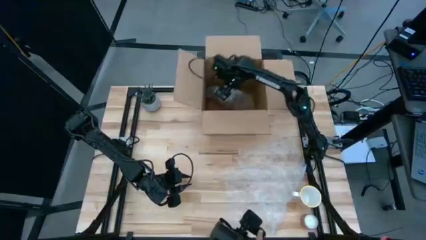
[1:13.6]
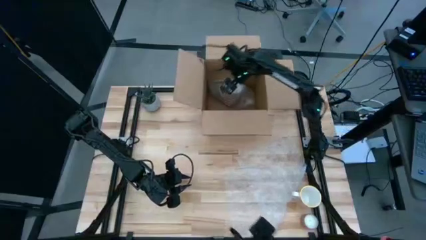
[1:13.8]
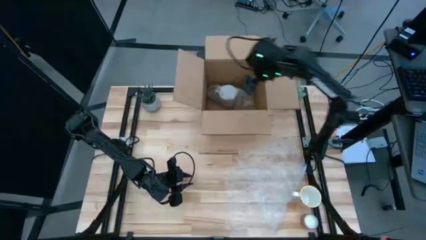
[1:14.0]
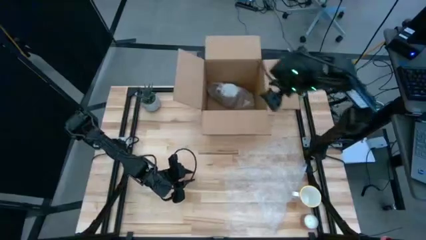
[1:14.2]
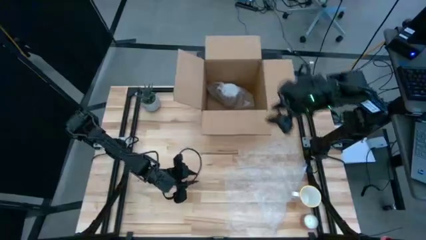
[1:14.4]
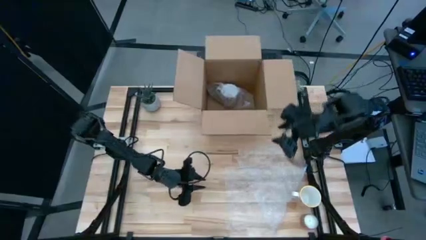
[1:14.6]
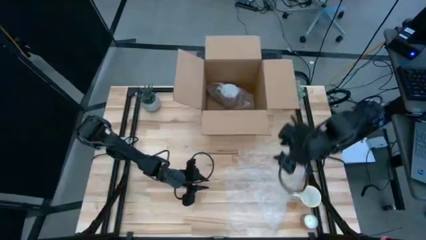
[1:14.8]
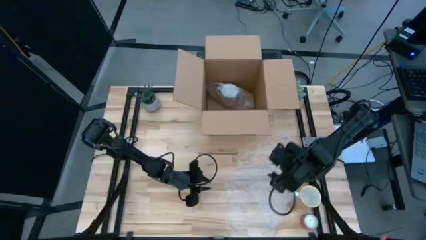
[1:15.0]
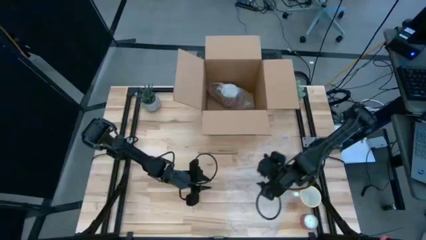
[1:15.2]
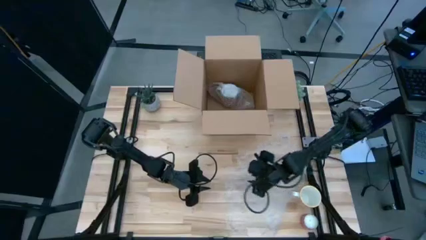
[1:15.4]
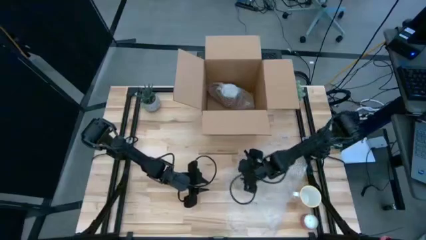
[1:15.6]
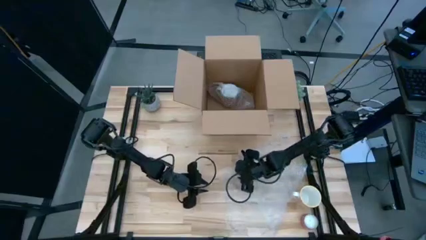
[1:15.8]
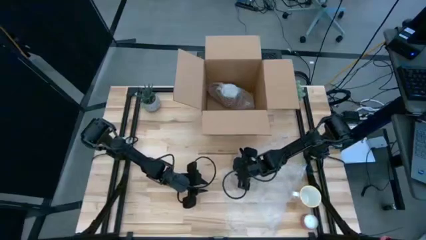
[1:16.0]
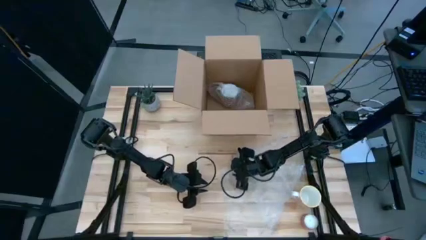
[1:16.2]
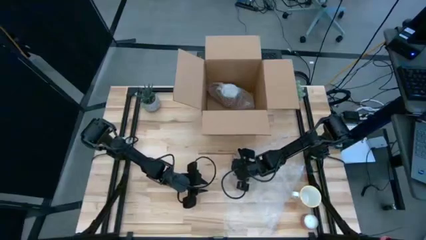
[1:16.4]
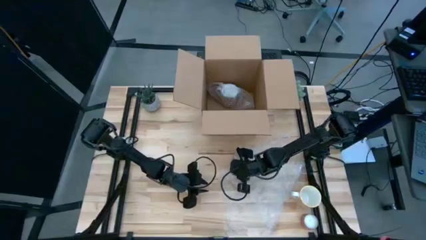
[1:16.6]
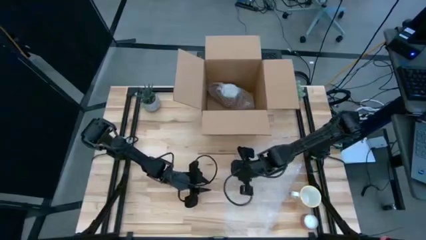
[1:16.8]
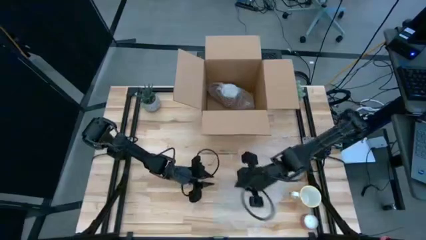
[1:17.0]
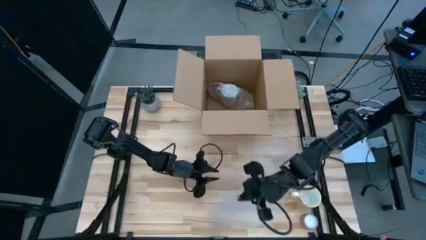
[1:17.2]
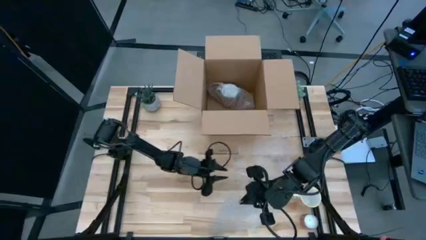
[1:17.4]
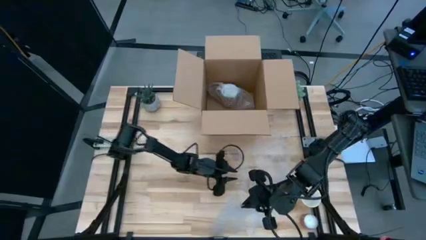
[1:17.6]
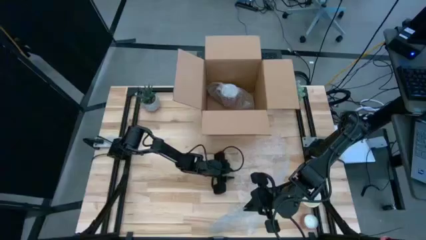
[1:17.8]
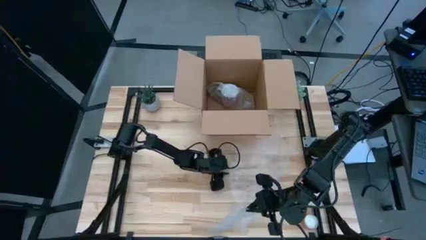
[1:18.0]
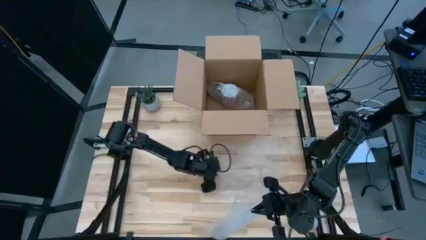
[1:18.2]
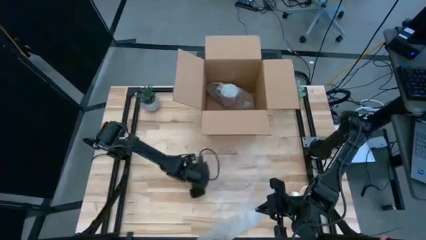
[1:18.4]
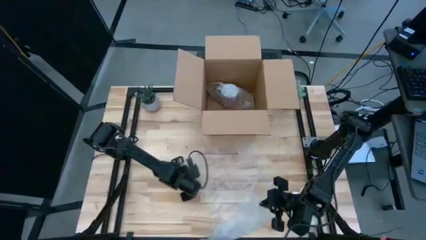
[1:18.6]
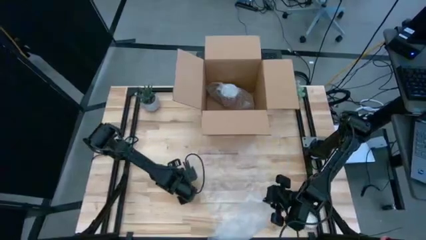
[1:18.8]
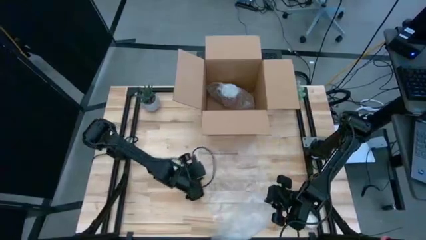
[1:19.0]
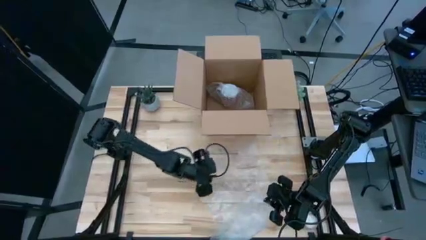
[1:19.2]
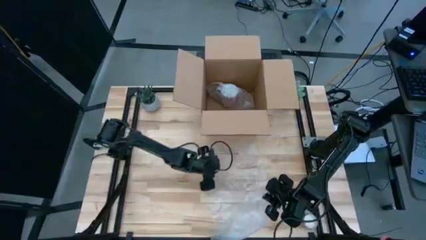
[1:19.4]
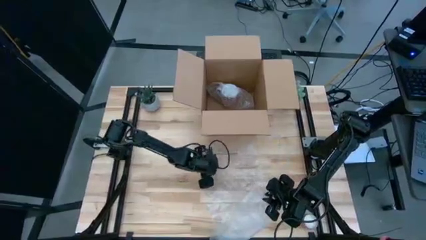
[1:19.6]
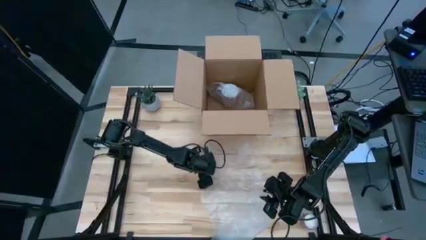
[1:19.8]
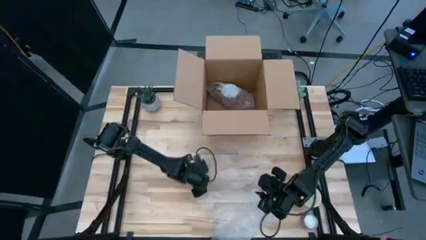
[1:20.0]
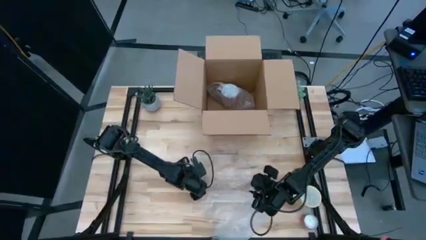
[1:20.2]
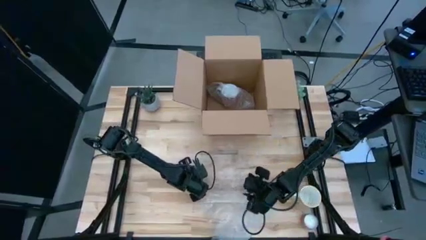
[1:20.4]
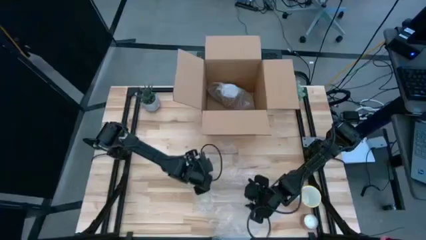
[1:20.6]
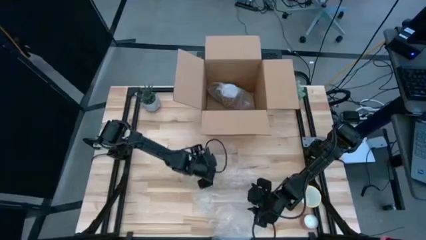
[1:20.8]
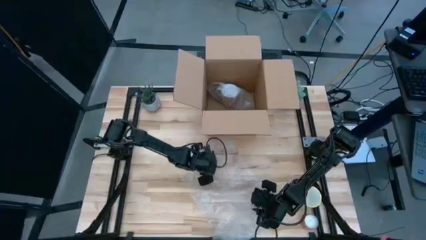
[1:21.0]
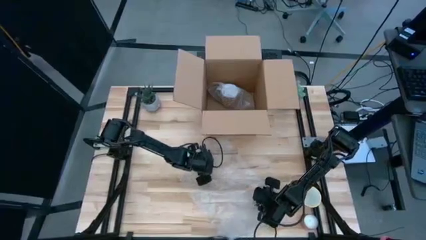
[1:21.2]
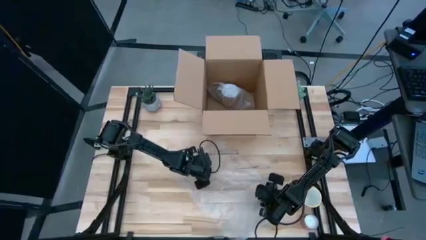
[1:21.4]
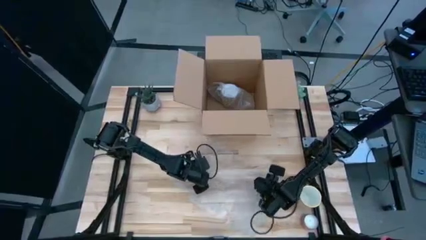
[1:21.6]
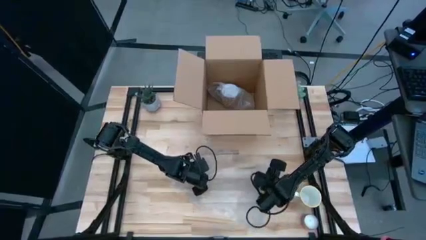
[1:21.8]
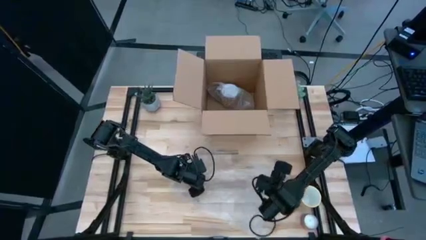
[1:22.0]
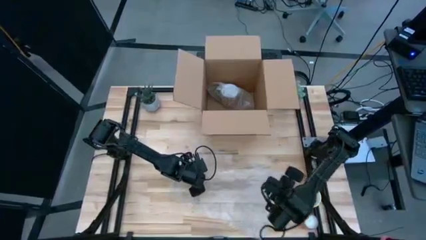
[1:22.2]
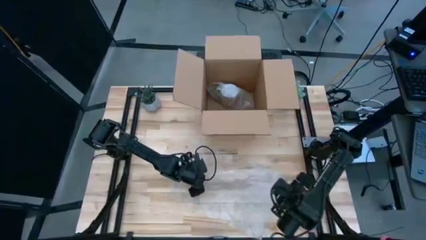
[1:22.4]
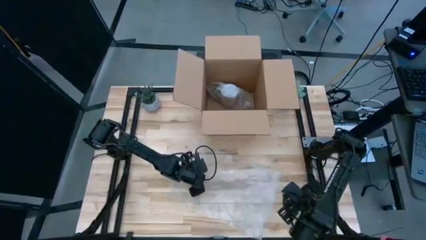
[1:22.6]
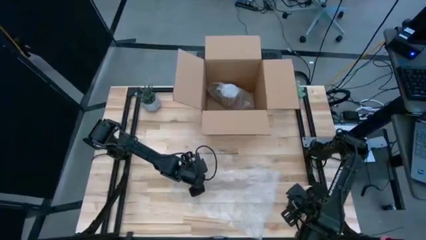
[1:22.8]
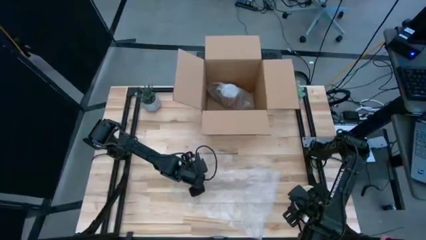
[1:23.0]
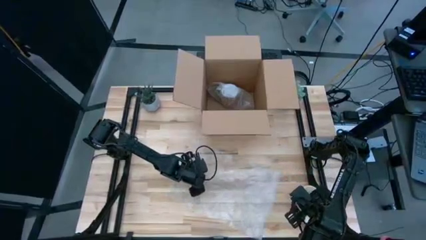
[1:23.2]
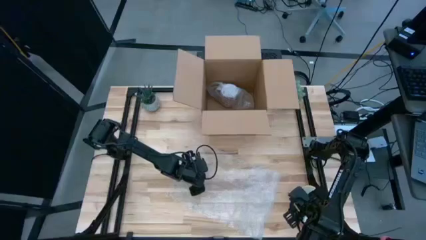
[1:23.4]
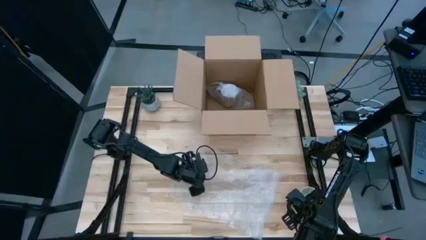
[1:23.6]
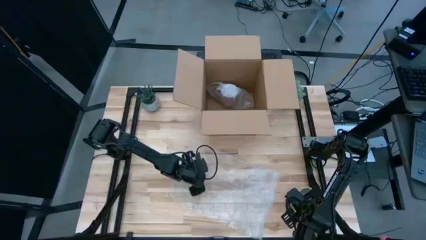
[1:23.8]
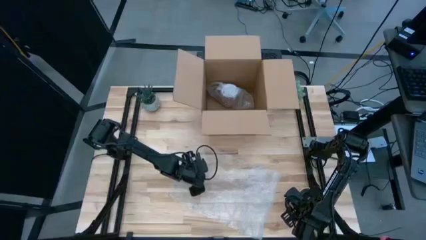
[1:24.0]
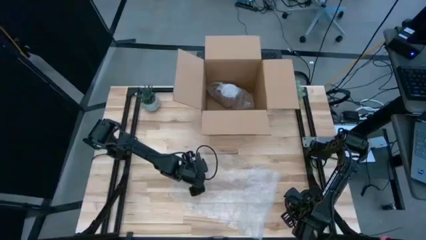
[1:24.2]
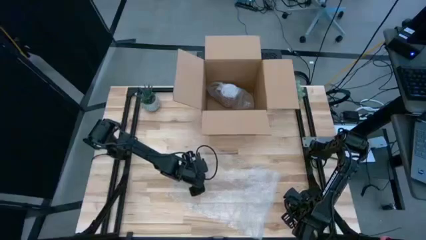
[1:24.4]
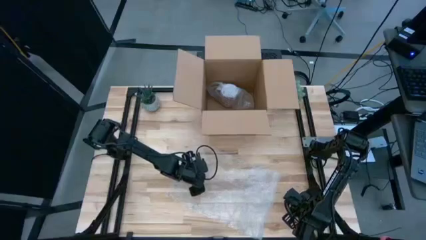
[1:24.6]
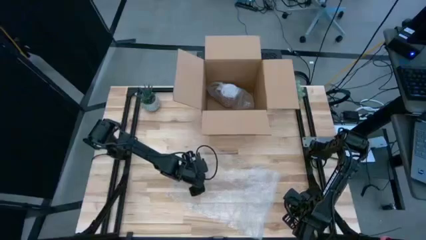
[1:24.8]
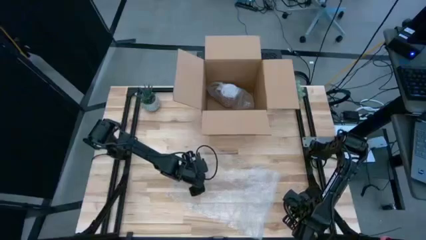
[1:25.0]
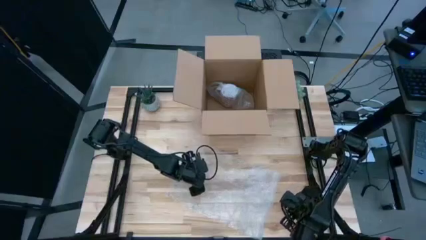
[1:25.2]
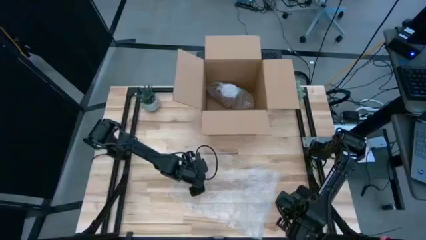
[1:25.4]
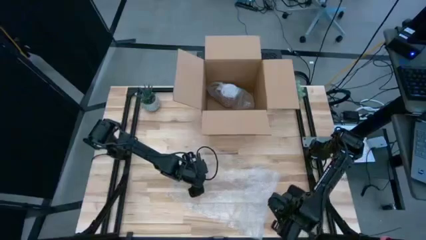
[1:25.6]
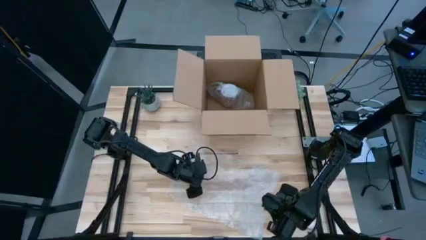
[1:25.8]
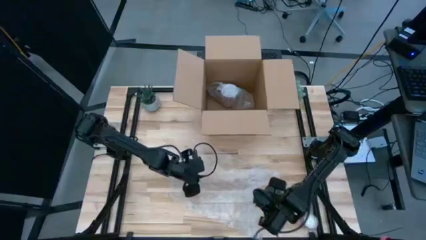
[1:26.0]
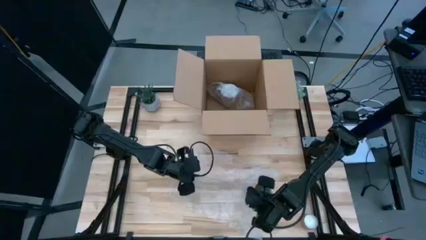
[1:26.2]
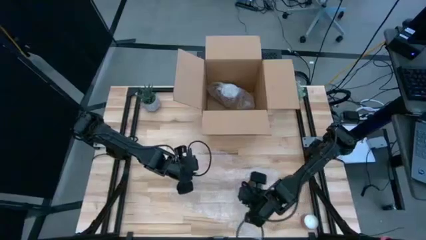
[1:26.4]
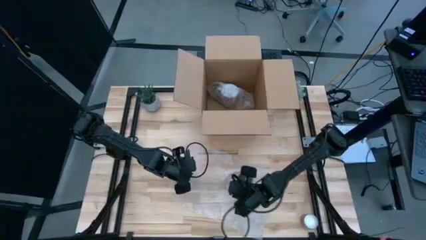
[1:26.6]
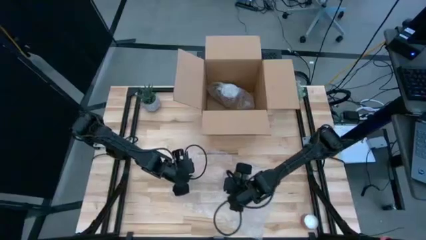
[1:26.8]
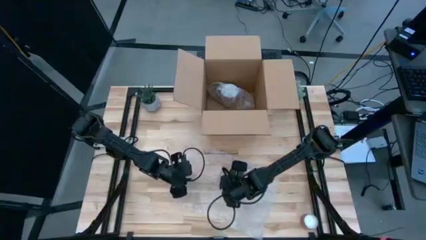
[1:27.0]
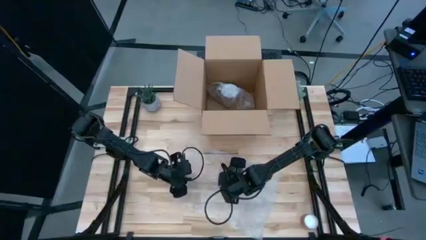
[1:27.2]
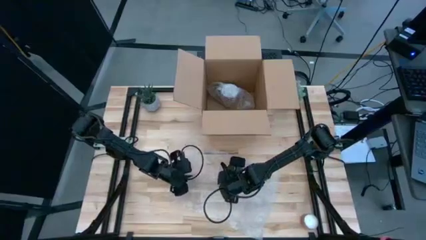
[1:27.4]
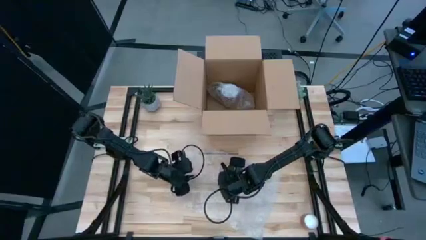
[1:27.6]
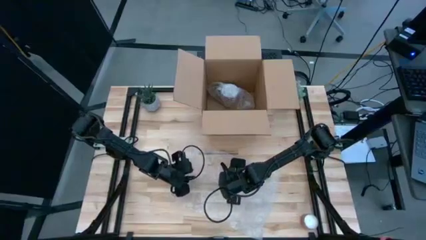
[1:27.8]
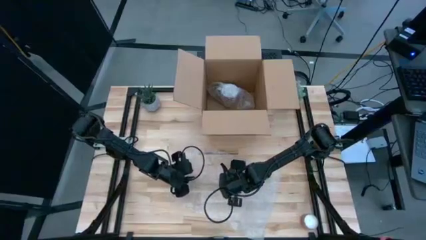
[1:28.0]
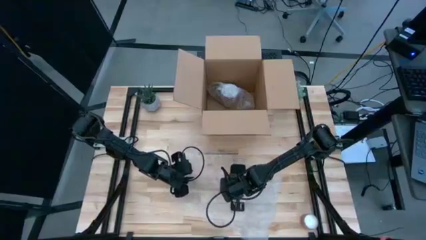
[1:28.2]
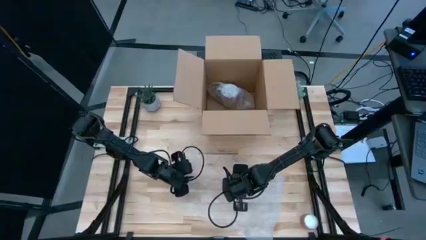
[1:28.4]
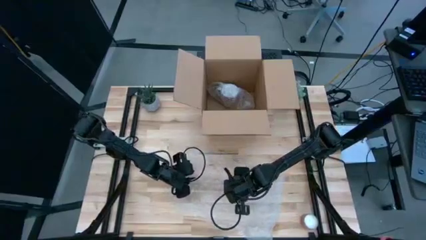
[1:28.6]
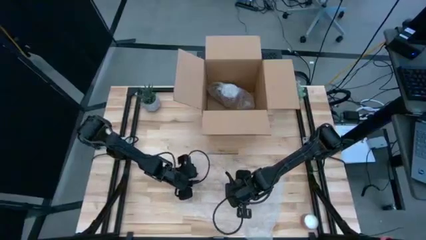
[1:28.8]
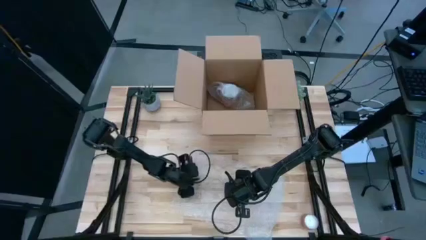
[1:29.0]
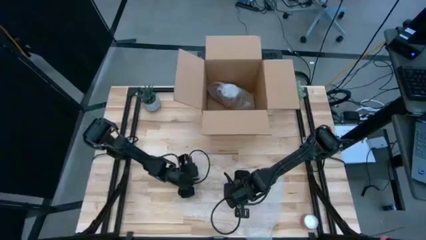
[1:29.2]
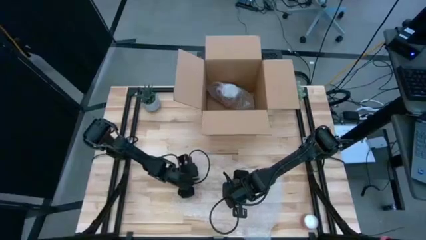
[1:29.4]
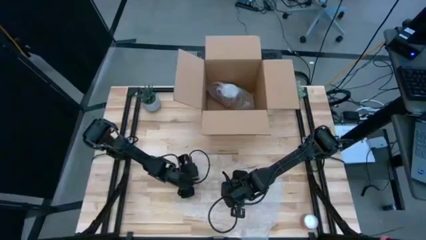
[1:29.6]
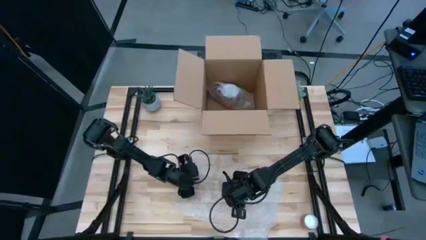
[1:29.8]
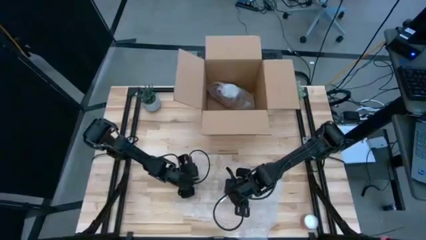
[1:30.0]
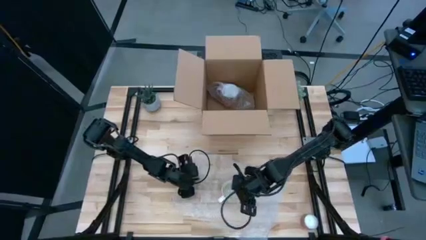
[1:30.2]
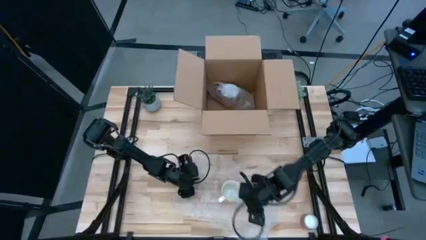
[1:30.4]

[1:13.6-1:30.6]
Task: wrap mug
Wrap the orange patterned mug with the transparent bubble wrap
